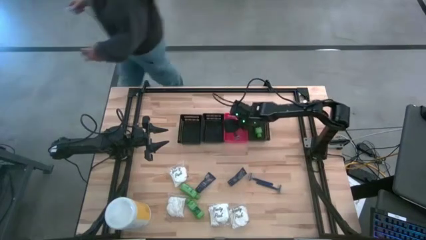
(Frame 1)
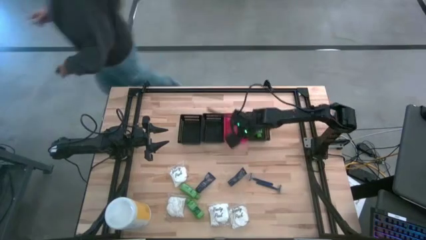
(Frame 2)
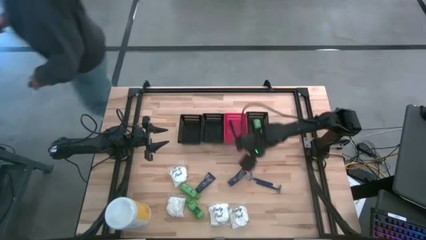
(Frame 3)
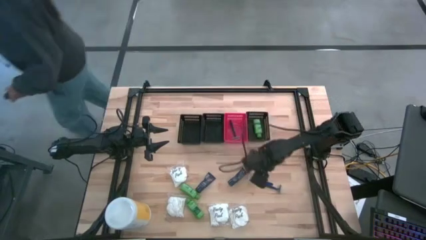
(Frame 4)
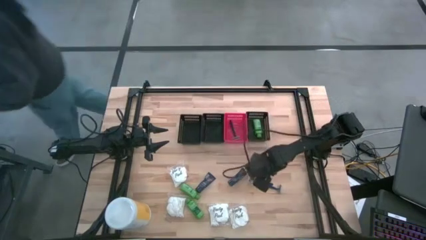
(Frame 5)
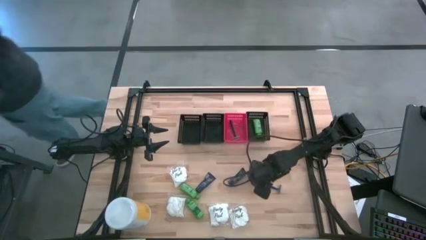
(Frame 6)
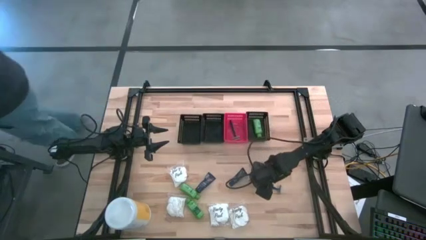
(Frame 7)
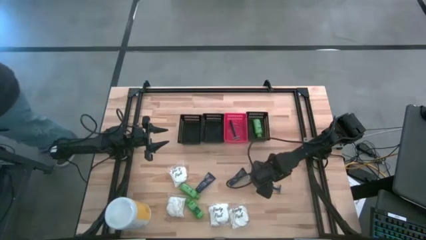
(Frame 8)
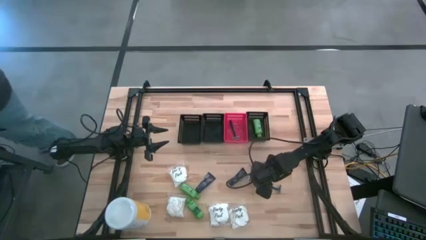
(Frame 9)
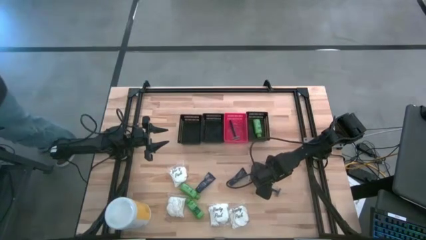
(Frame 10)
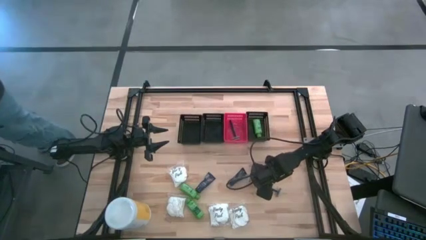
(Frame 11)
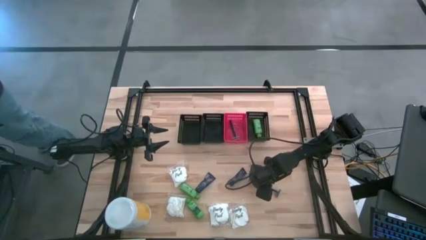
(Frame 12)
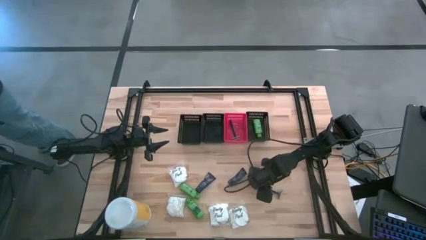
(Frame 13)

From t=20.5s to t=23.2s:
Task: Pick & Place Travel size toiletries
Put the razor into the red bin

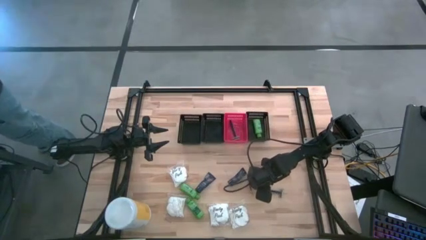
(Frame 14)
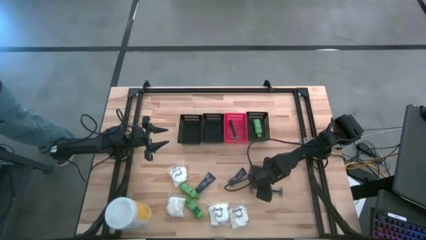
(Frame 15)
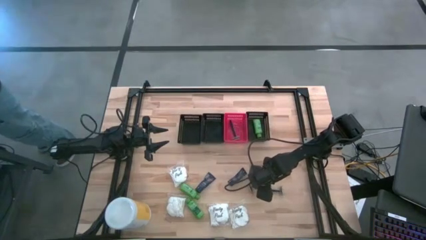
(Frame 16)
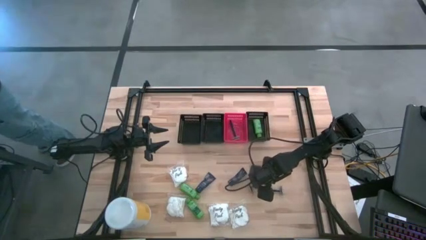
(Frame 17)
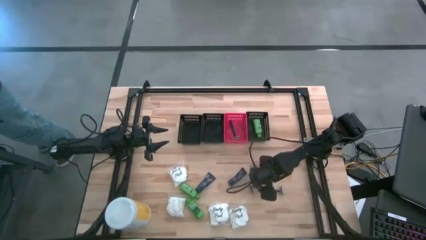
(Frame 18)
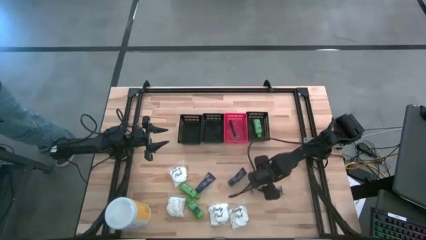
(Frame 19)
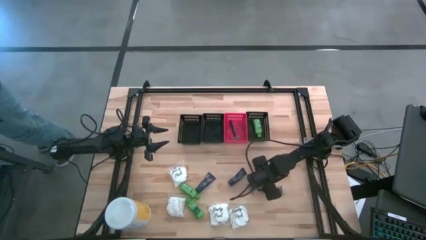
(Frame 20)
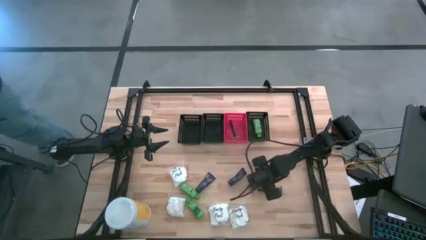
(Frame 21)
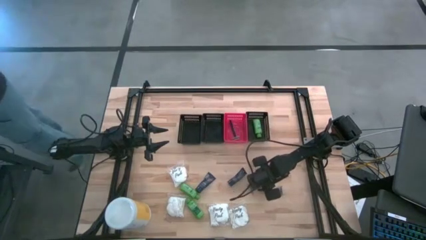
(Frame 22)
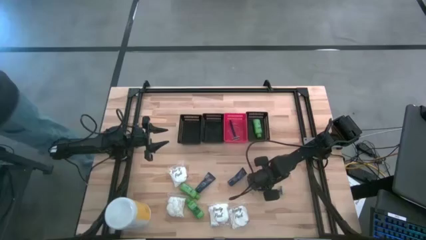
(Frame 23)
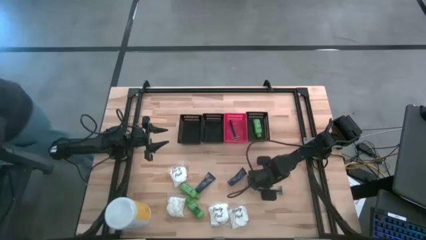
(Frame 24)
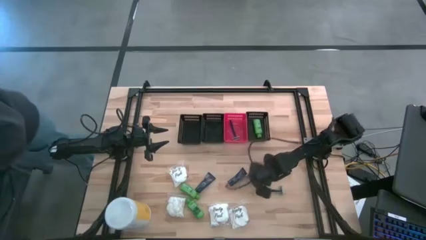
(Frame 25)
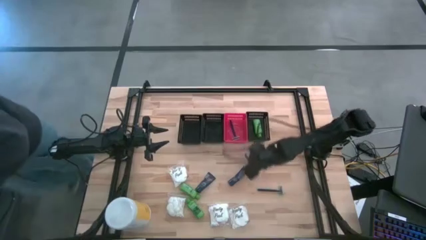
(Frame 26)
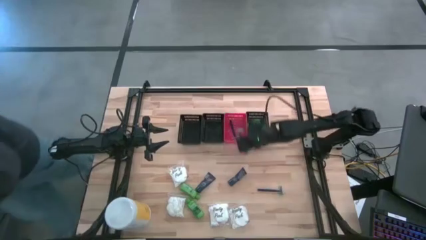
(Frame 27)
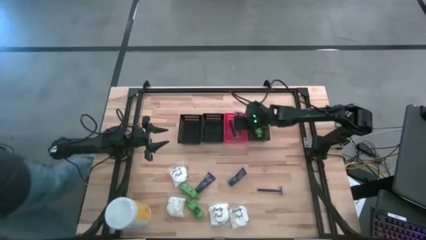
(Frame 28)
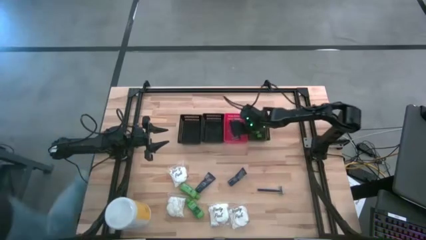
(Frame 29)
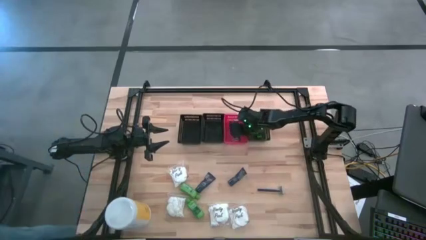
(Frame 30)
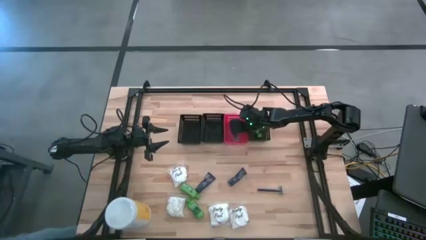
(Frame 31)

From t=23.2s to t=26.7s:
Put the razor into the red bin

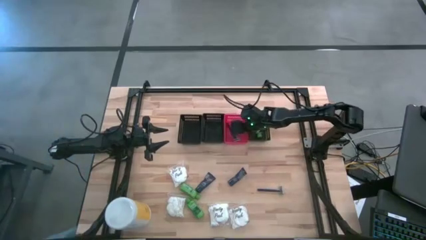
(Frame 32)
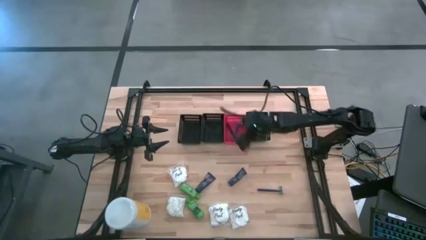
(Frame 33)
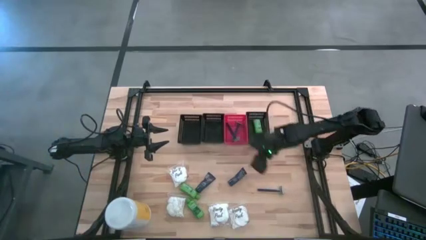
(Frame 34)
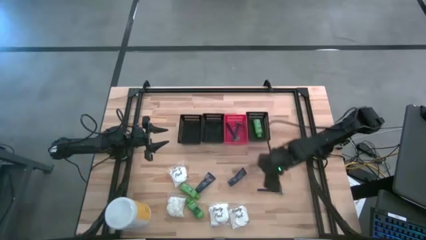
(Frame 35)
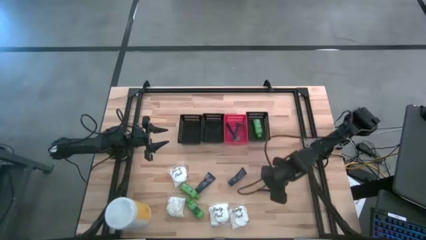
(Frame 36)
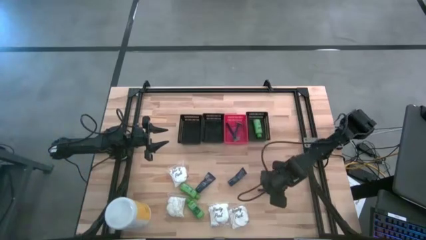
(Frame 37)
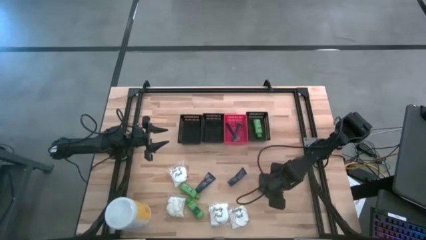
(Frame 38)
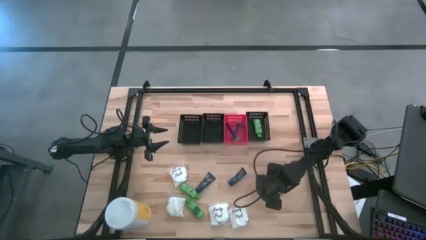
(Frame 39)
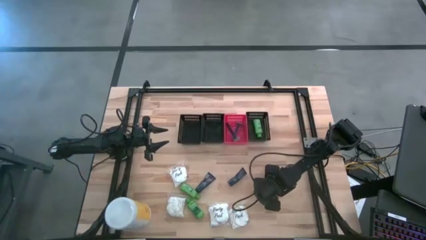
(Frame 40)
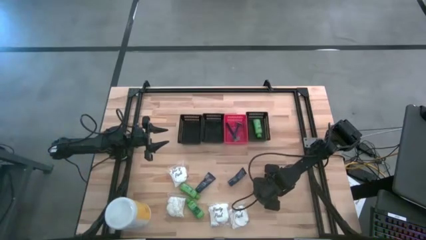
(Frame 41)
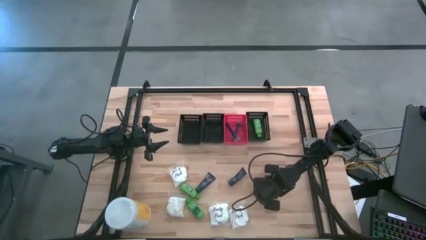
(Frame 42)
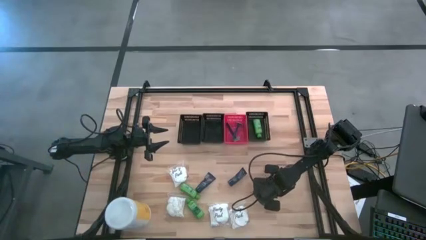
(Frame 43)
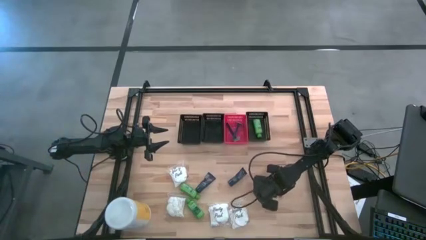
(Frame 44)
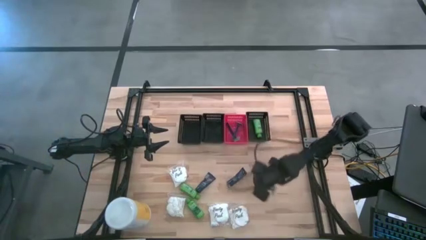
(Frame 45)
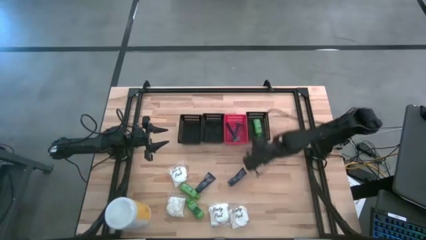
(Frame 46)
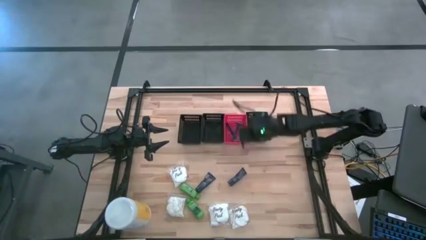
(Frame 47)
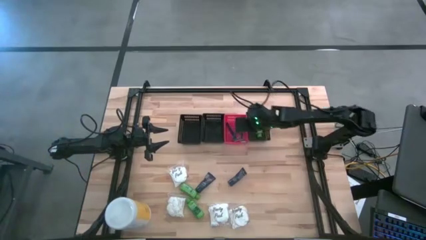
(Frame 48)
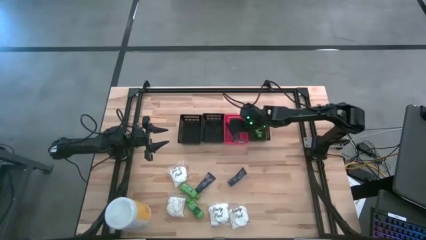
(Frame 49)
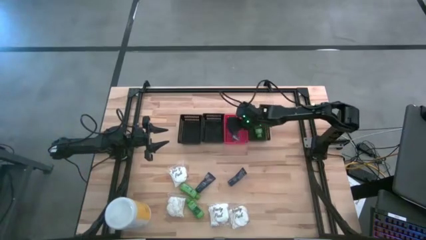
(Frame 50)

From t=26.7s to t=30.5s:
Put the razor into the red bin

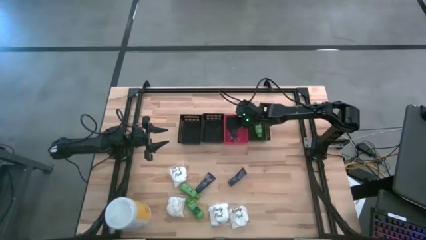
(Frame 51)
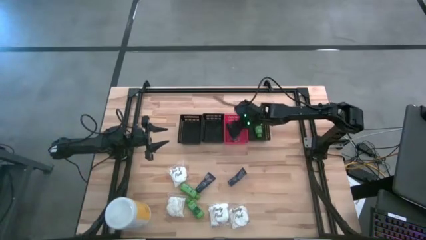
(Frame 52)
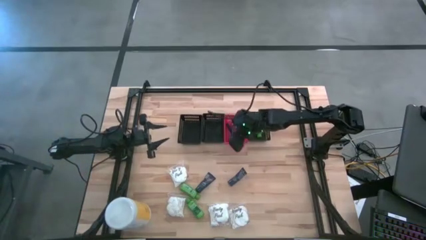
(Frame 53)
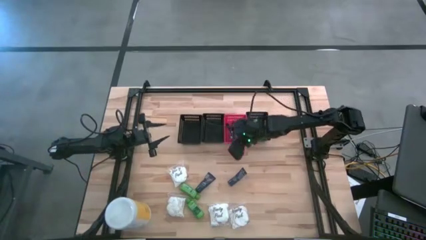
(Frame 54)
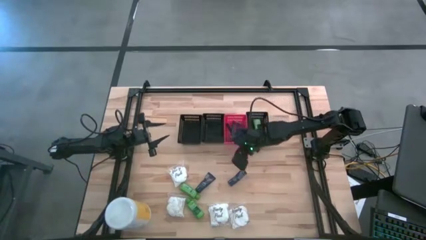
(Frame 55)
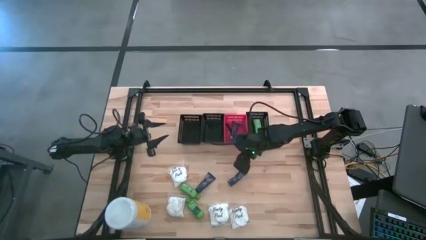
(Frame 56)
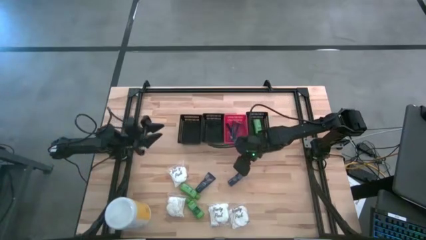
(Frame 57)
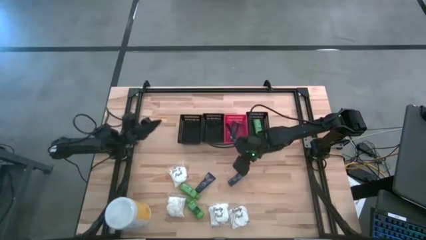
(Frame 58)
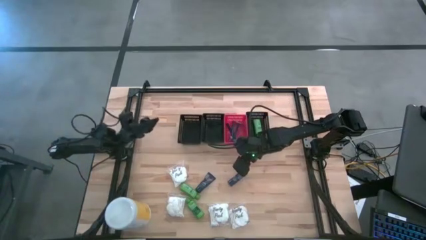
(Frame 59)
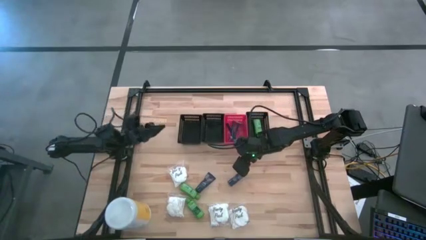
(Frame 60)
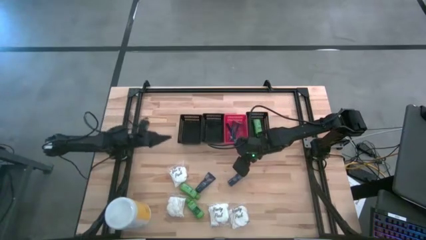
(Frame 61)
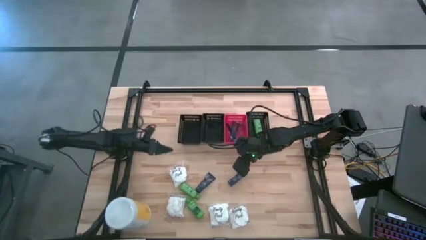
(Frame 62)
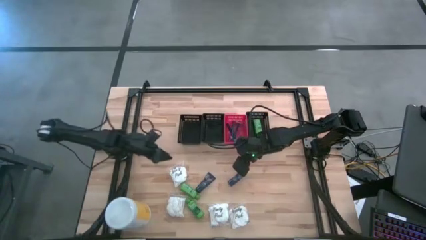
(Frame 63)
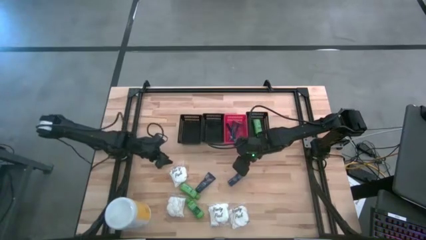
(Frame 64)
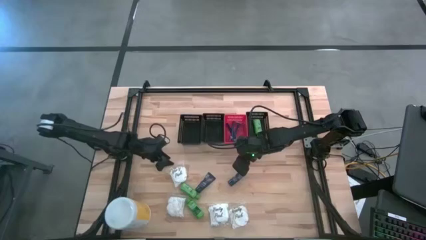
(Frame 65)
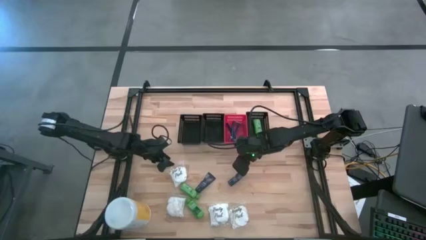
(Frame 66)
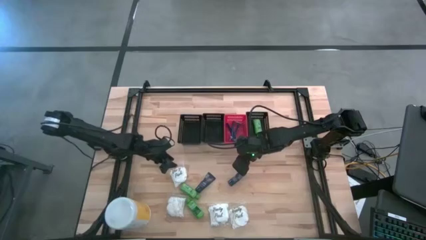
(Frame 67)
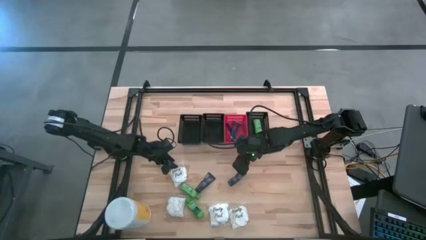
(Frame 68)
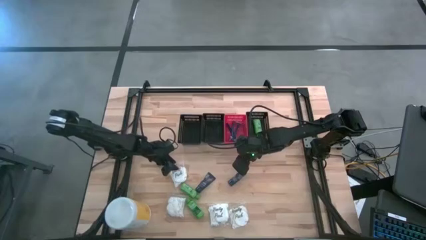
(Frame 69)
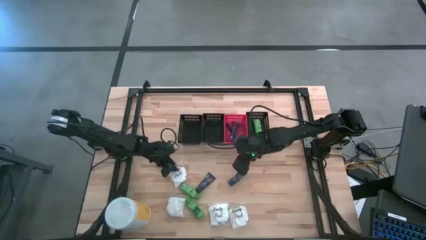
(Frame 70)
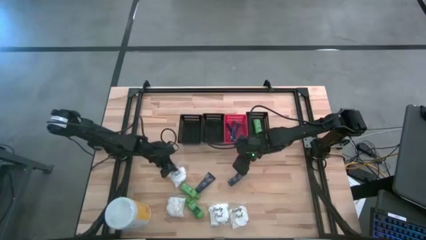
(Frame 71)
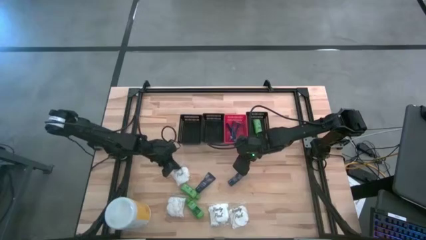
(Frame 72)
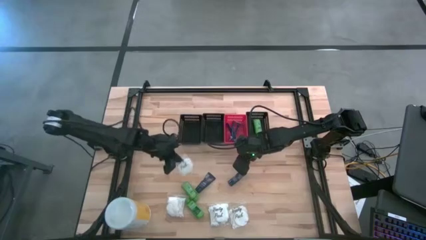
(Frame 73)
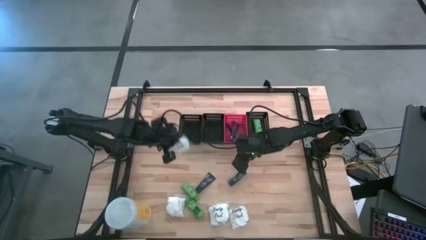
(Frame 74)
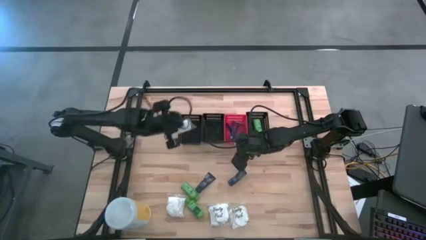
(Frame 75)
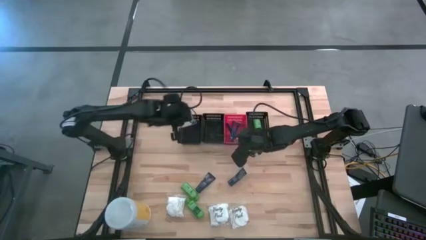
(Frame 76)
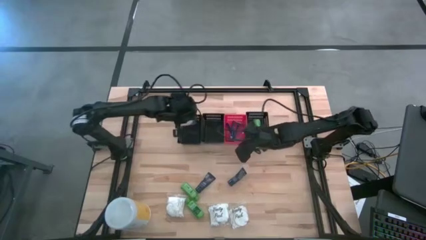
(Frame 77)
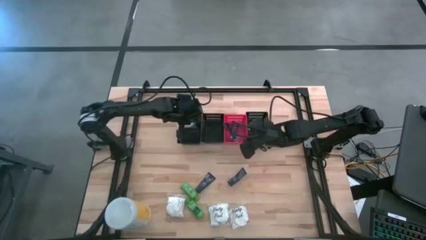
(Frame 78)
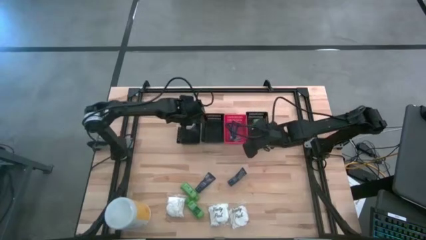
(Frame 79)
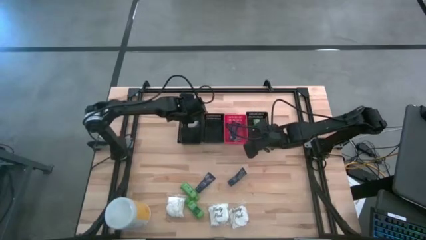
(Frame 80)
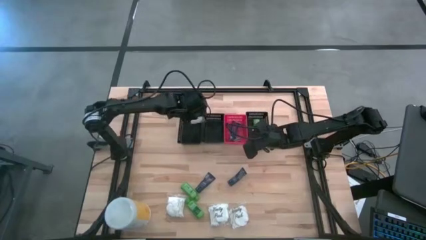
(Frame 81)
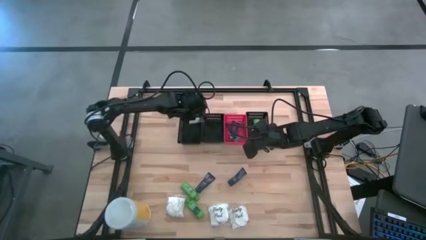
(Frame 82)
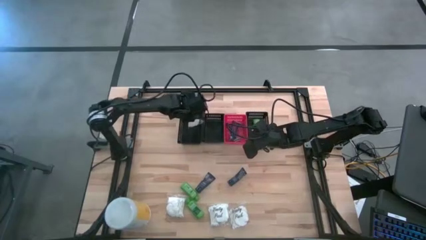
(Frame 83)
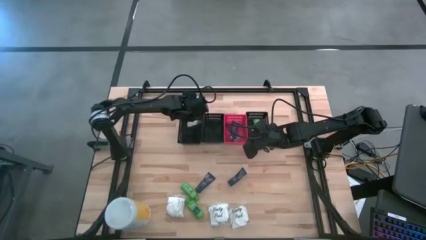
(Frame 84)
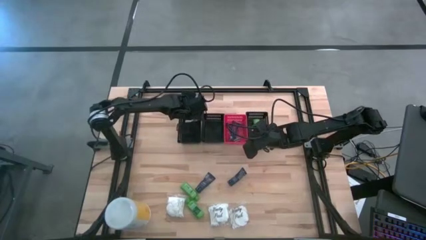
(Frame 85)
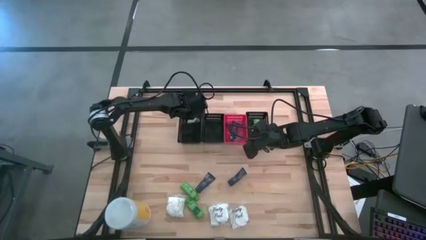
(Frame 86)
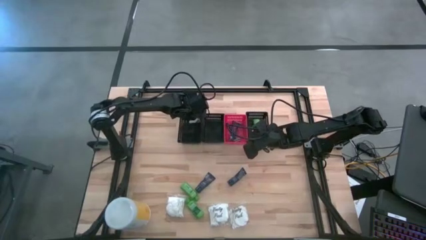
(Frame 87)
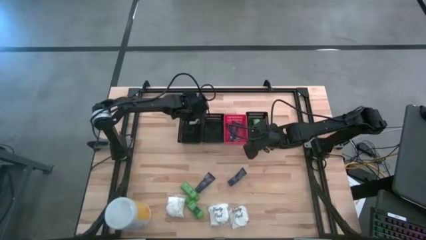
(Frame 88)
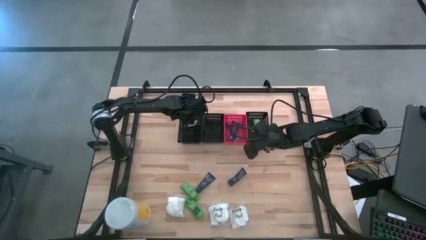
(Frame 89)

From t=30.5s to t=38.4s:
Put the cotton pack into the left black bin
